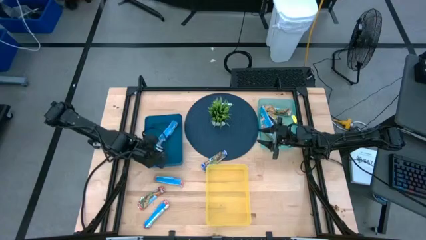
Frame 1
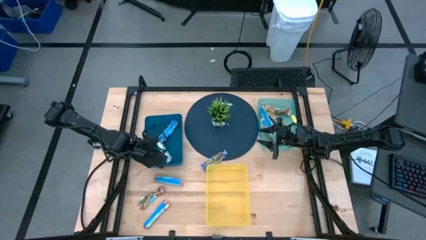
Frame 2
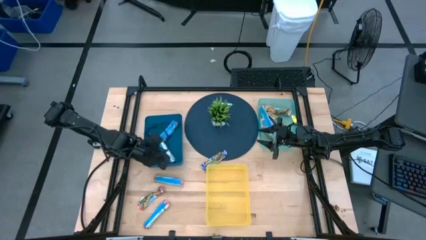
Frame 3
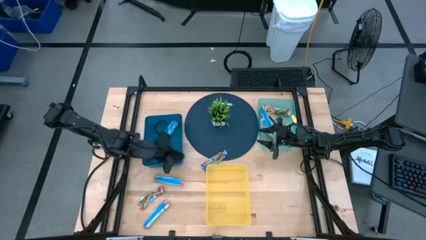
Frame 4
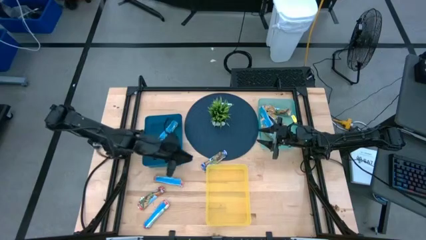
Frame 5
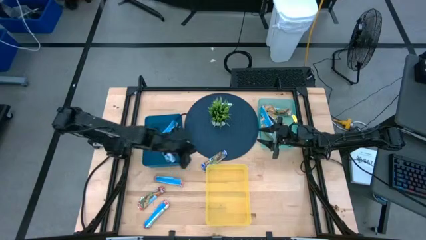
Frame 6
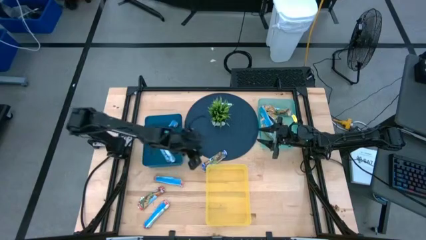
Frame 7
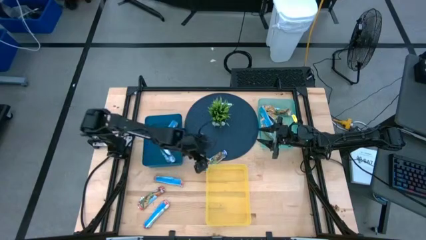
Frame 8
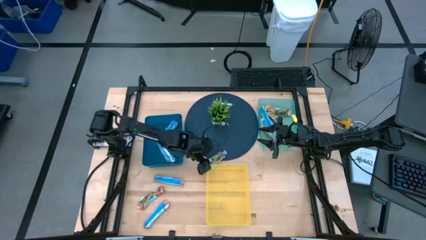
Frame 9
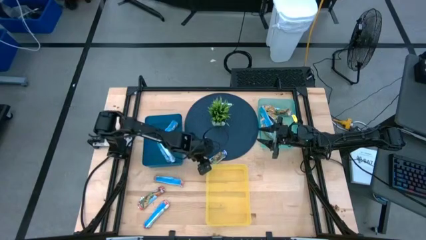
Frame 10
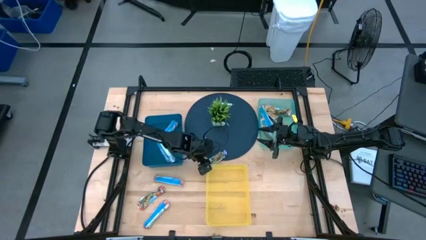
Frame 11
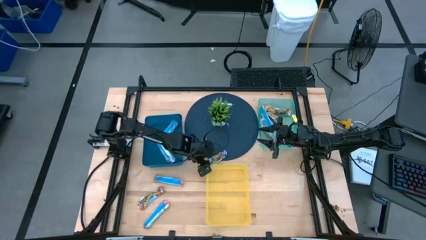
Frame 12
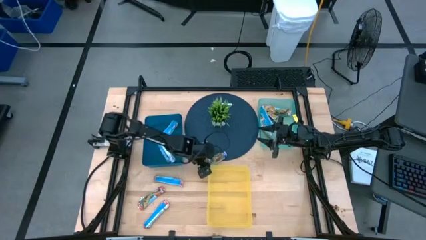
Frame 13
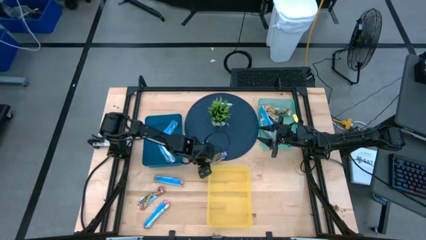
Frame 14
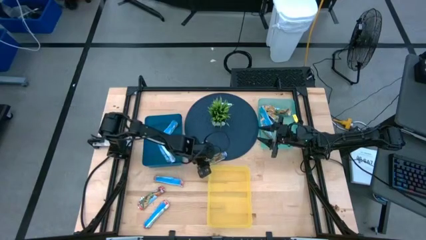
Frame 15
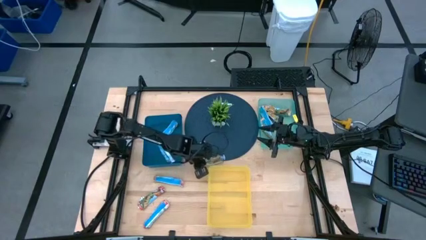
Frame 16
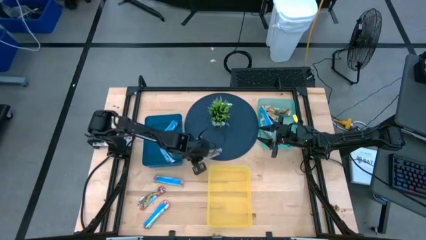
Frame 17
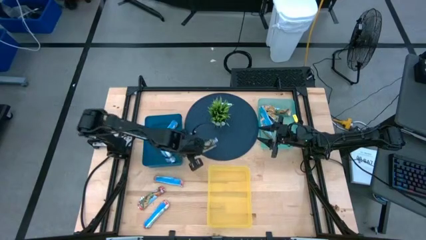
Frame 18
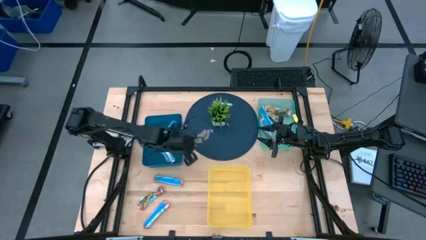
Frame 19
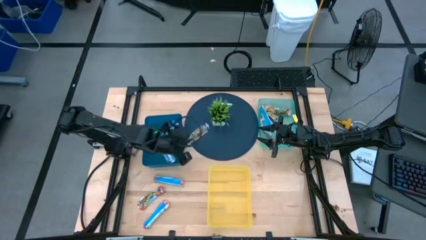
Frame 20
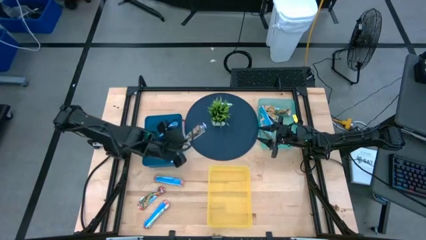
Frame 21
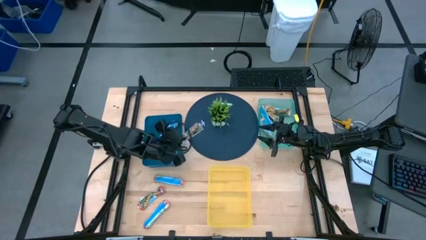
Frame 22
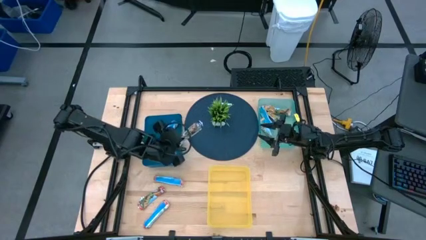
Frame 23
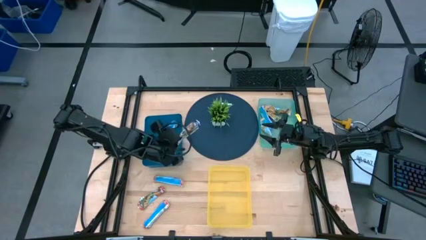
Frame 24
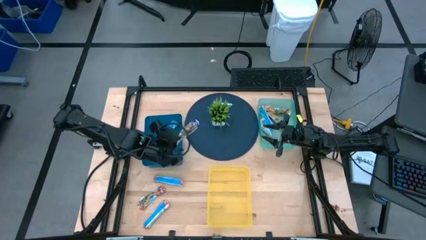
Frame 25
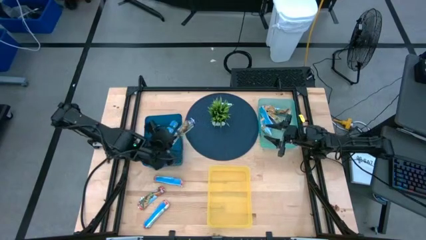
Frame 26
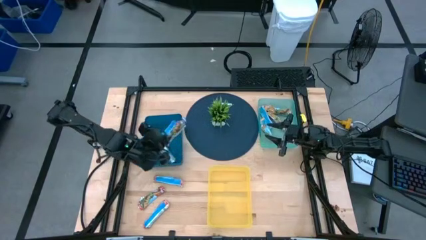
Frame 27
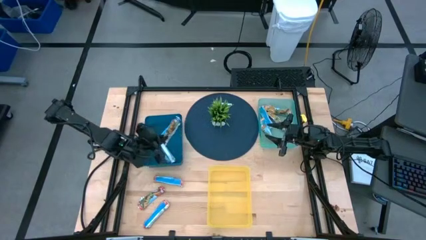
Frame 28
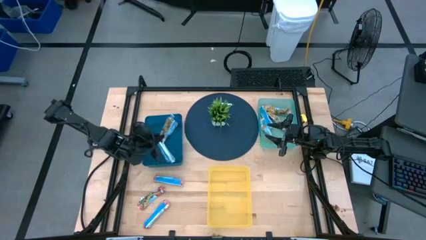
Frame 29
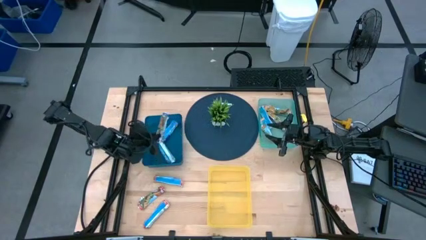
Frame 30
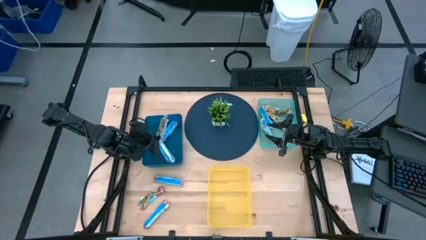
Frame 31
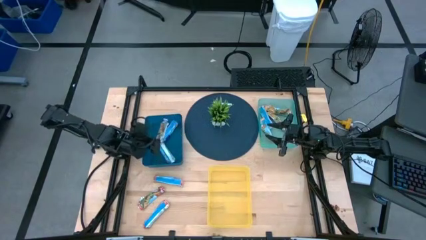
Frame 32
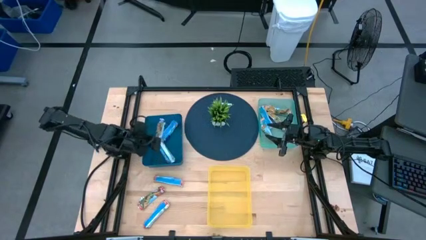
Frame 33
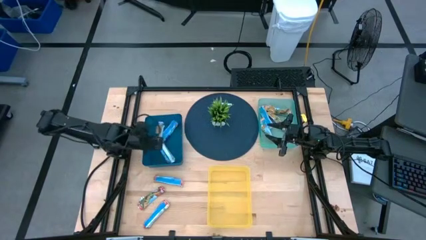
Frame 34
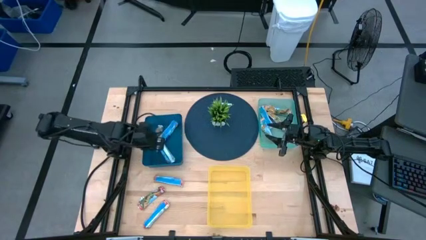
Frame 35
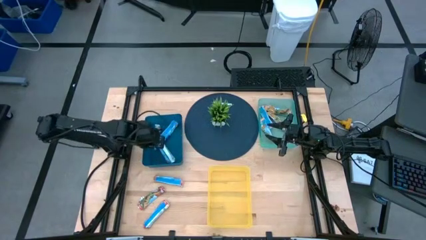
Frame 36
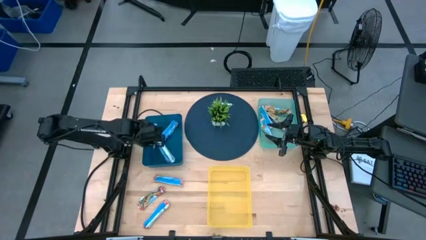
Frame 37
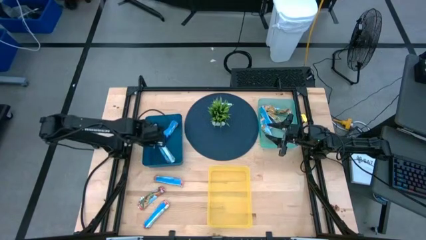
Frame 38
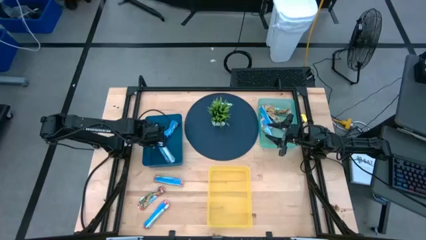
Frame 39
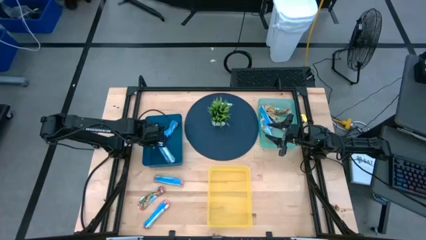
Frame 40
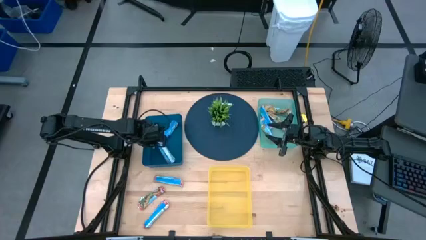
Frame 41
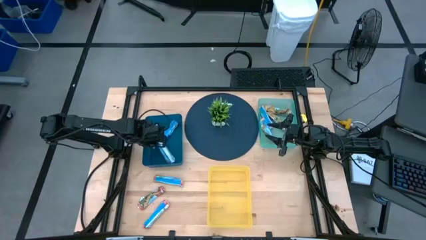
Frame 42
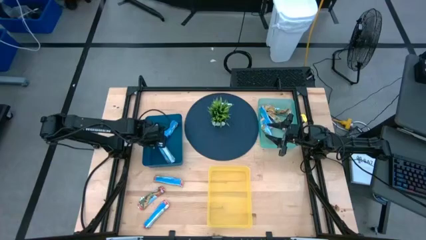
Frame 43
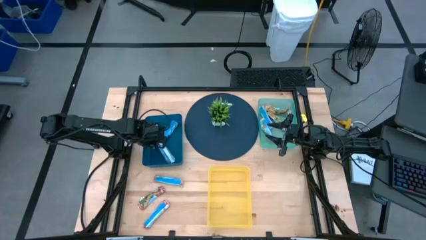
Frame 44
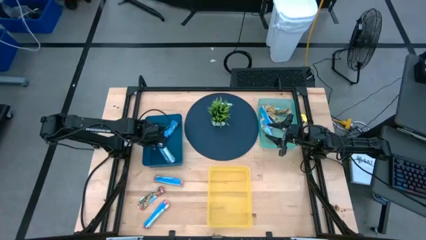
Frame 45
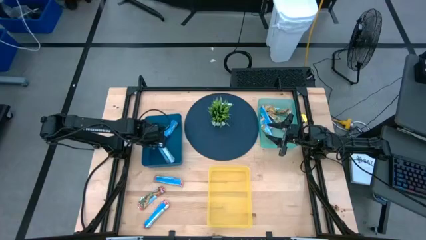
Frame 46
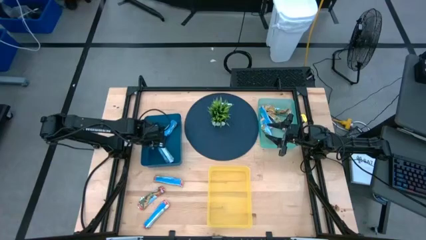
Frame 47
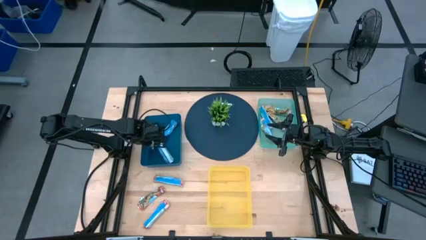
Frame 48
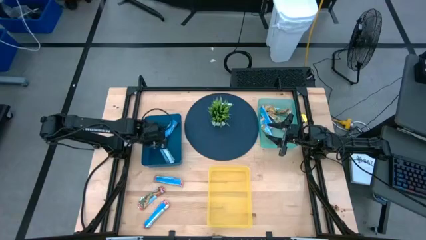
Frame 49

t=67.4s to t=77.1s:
Task: Pick and place Granola Bars by type
Put the blue granola bar into the blue bin

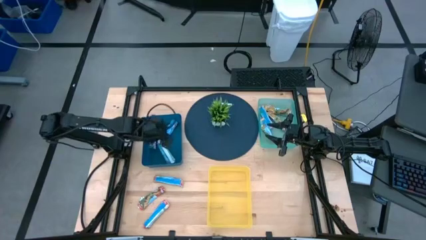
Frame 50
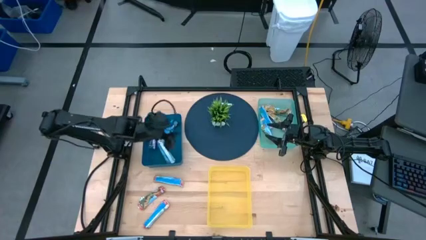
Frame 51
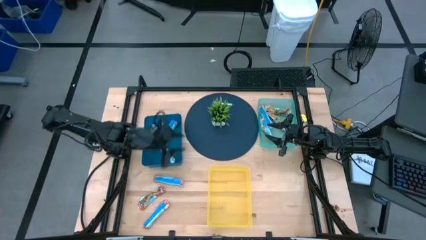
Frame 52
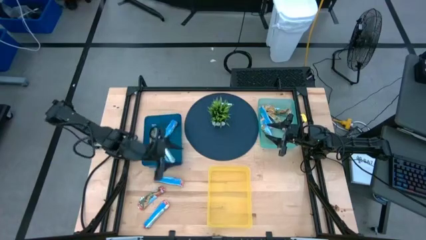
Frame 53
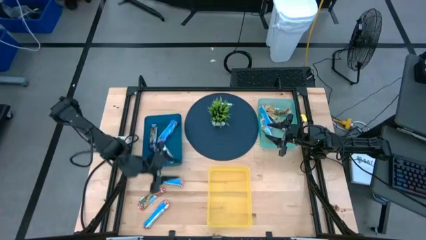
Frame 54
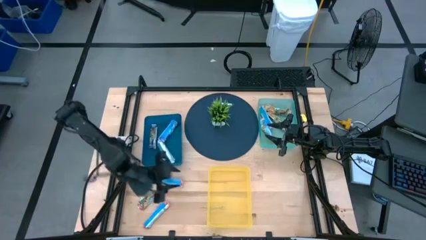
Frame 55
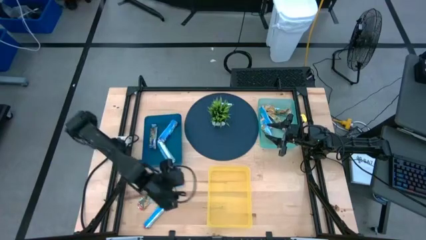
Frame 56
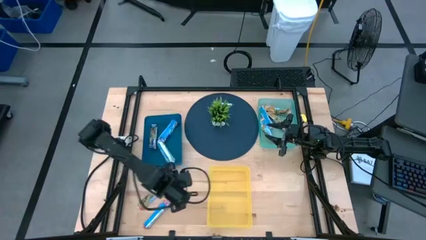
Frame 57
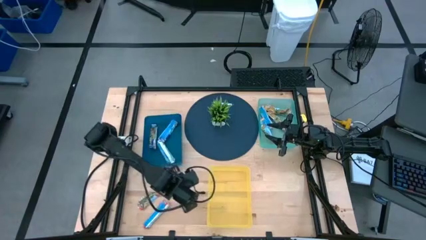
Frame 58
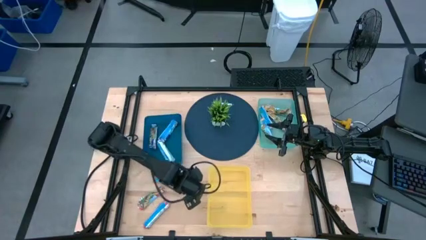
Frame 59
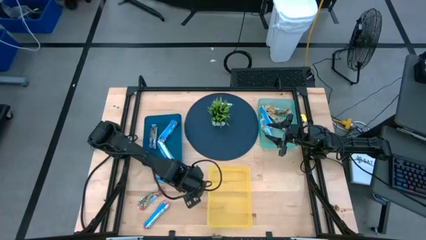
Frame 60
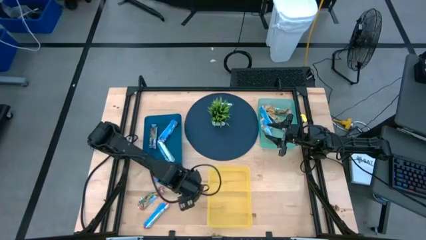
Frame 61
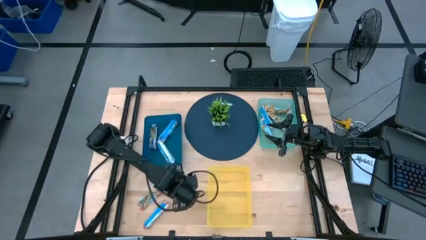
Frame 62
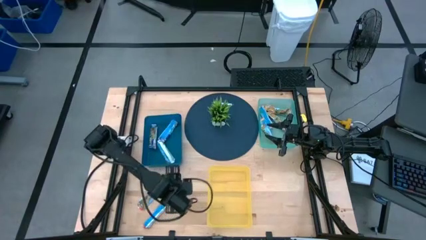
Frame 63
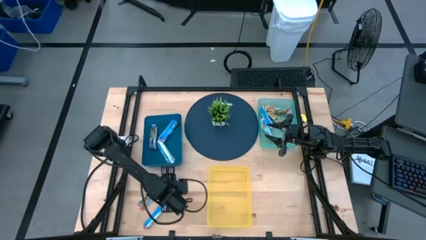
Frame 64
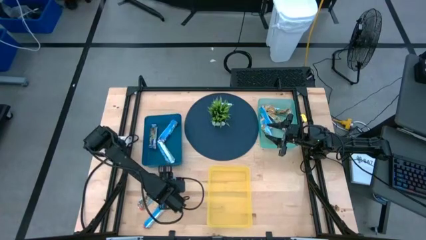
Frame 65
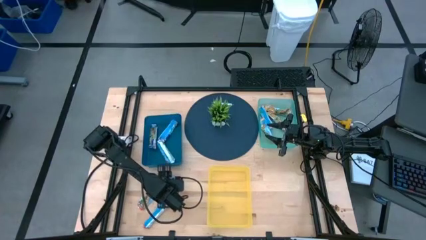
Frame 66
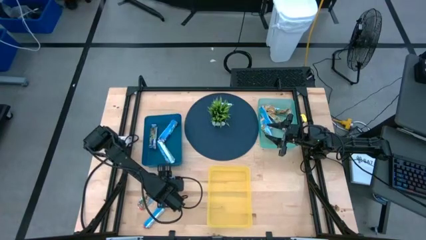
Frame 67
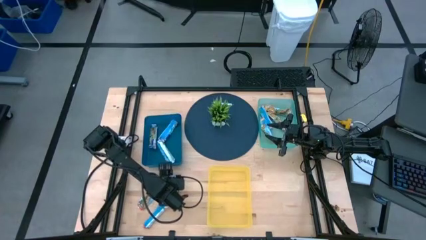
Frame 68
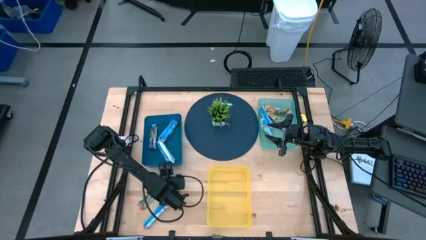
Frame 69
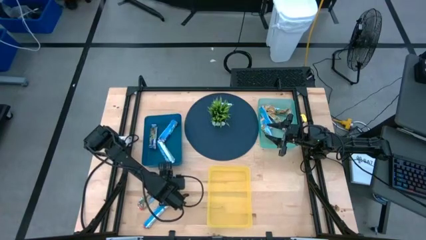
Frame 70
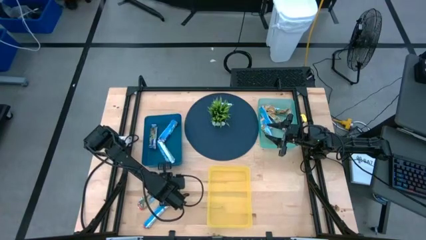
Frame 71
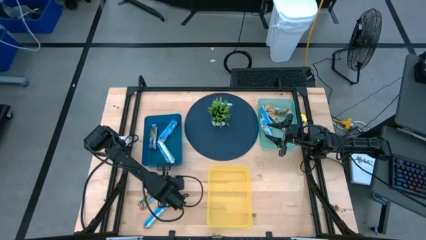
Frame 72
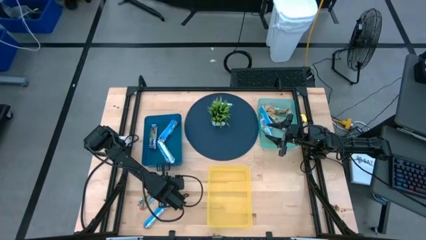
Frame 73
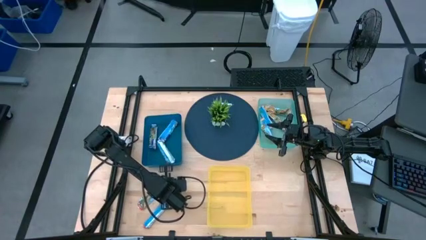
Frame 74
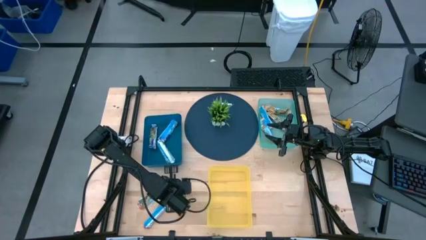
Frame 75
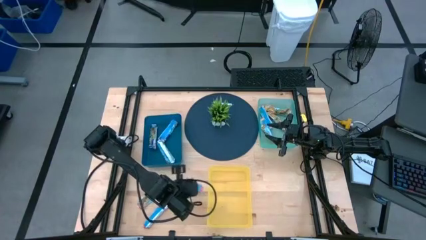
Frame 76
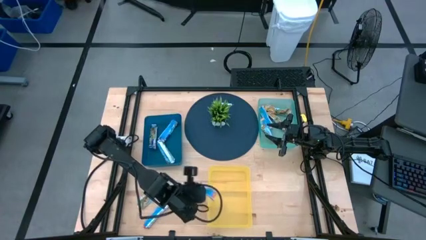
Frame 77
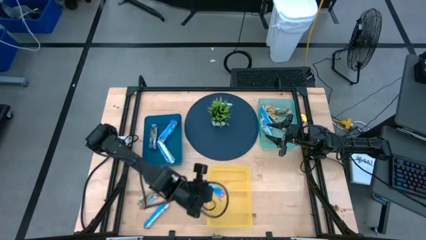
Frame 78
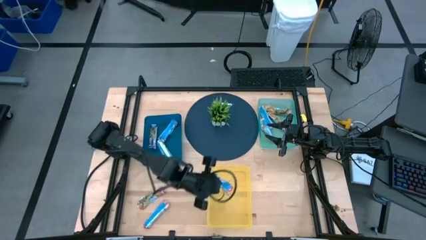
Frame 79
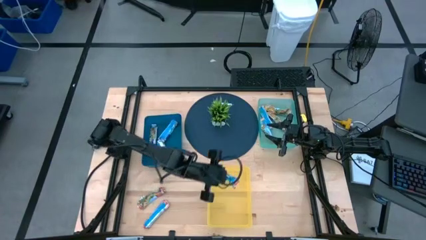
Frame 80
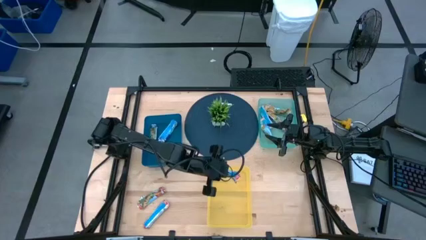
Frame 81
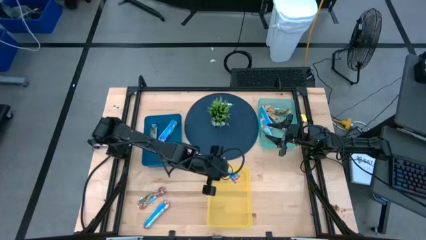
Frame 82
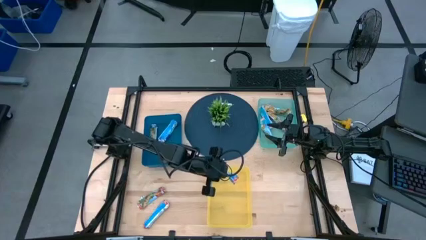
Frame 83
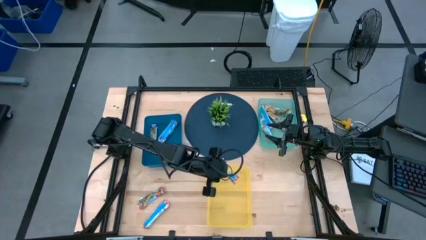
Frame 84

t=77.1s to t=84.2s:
Put the red granola bar into the yellow bin
